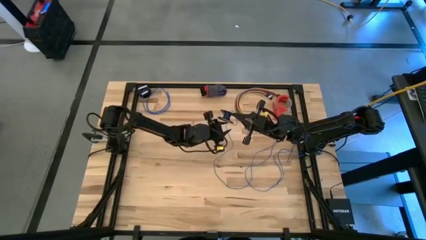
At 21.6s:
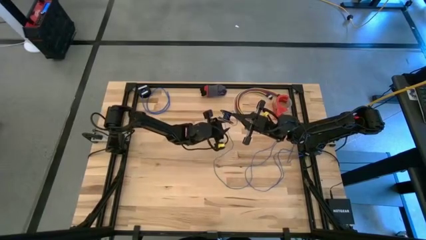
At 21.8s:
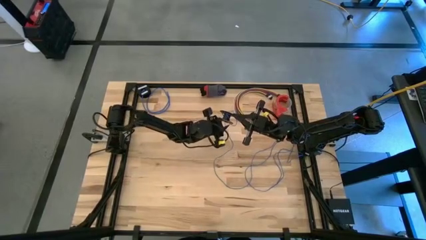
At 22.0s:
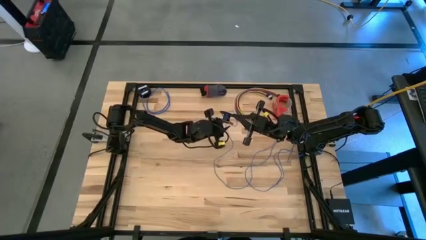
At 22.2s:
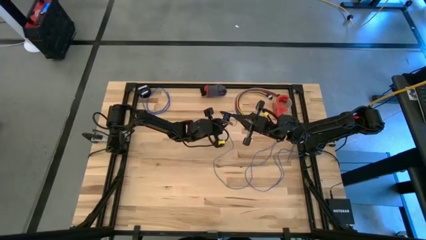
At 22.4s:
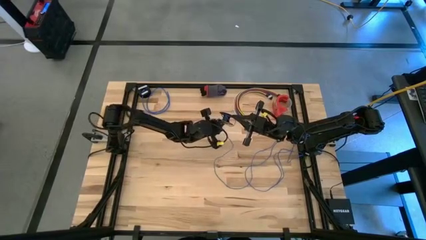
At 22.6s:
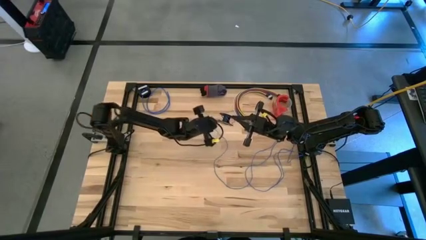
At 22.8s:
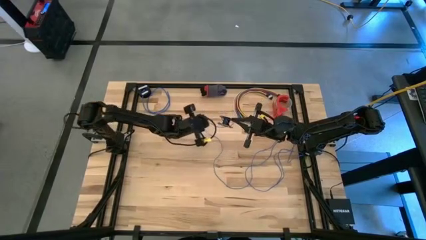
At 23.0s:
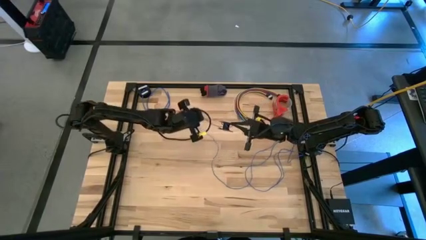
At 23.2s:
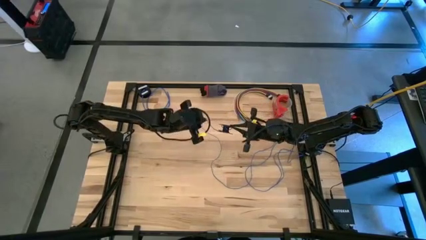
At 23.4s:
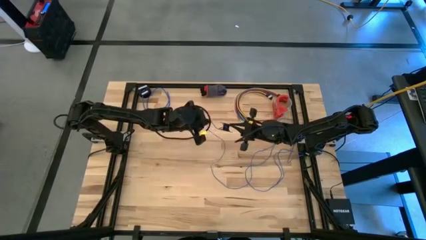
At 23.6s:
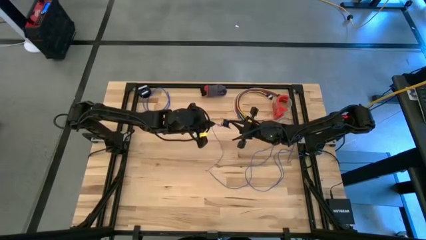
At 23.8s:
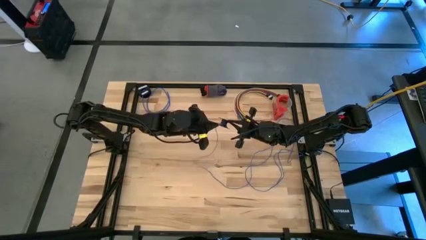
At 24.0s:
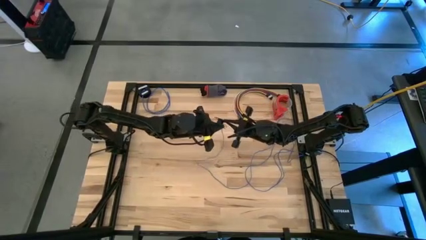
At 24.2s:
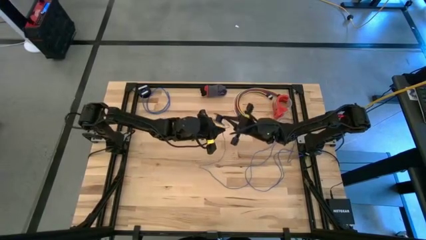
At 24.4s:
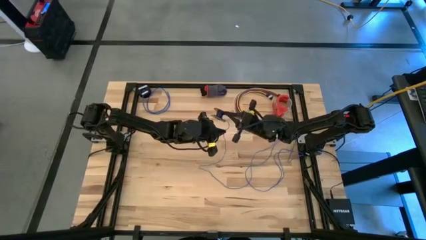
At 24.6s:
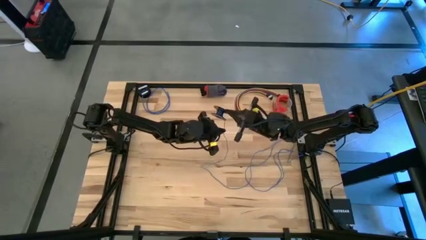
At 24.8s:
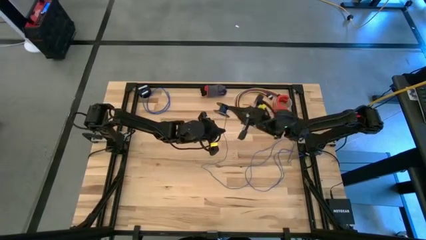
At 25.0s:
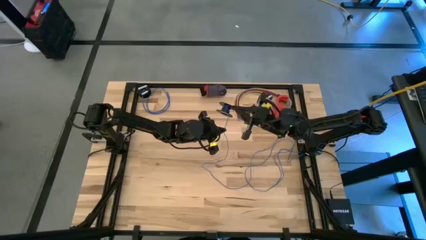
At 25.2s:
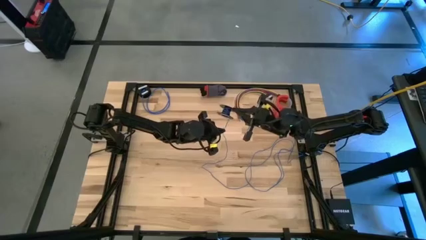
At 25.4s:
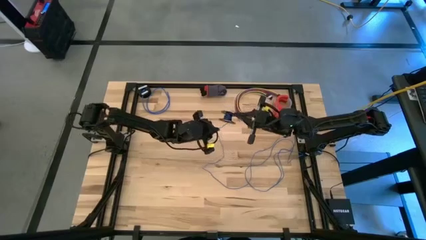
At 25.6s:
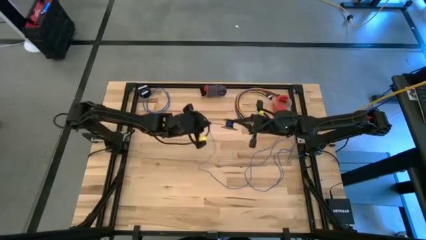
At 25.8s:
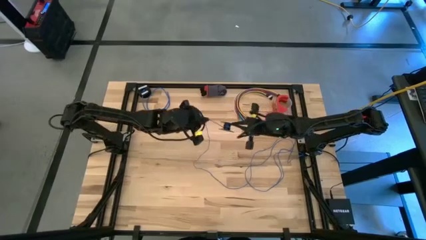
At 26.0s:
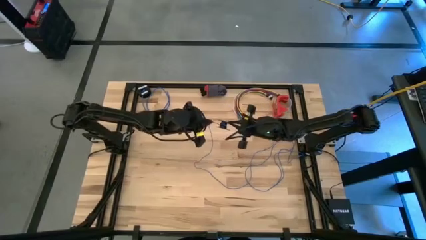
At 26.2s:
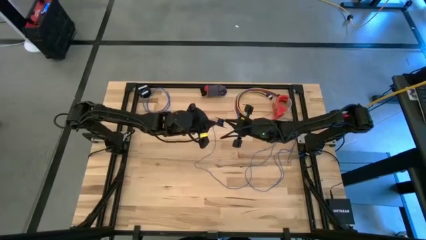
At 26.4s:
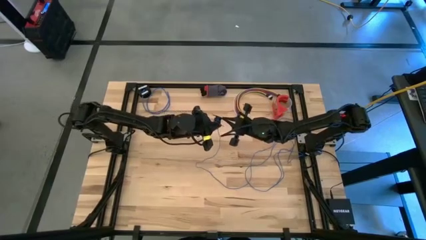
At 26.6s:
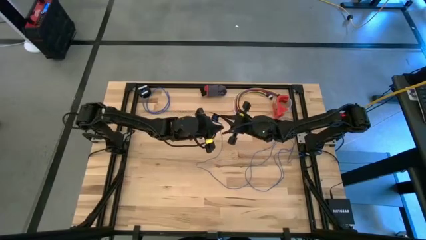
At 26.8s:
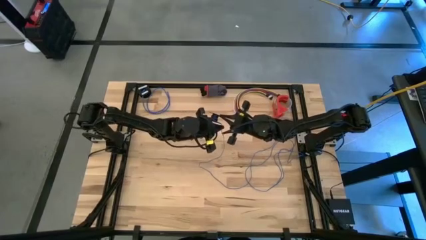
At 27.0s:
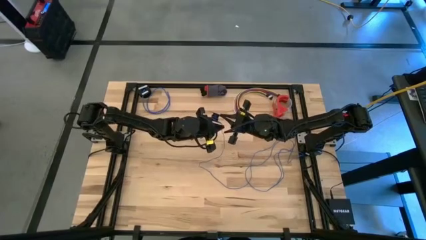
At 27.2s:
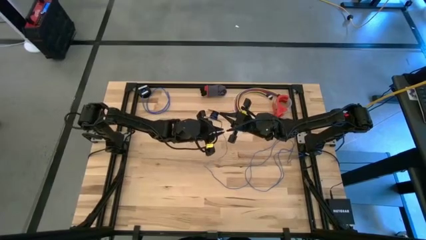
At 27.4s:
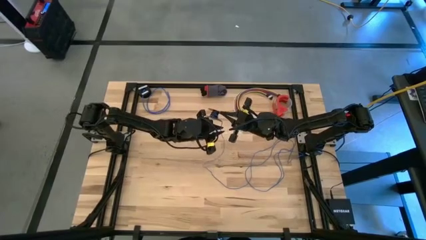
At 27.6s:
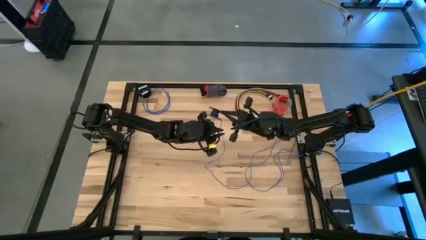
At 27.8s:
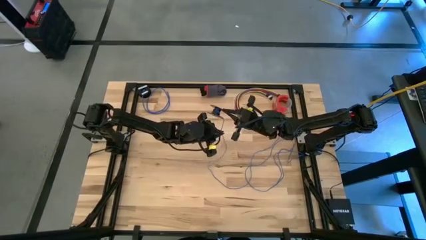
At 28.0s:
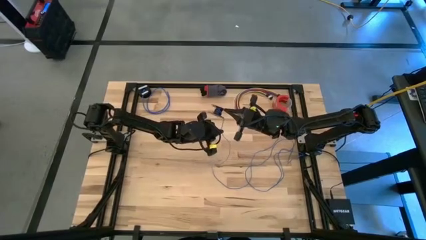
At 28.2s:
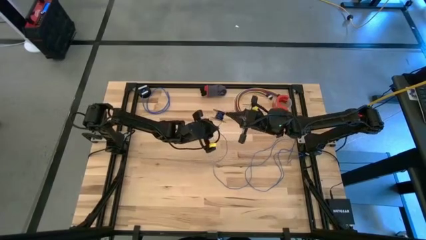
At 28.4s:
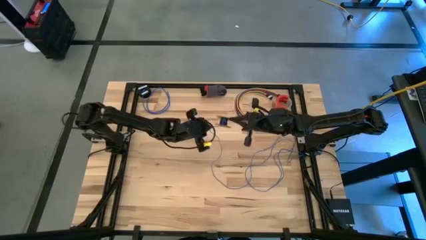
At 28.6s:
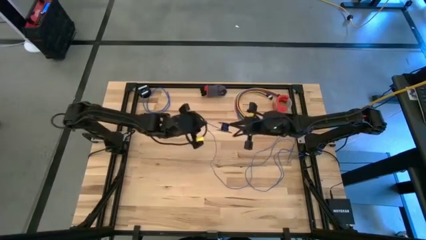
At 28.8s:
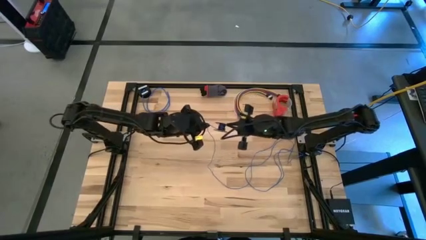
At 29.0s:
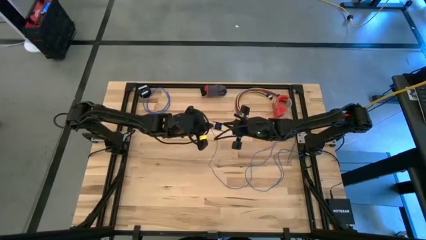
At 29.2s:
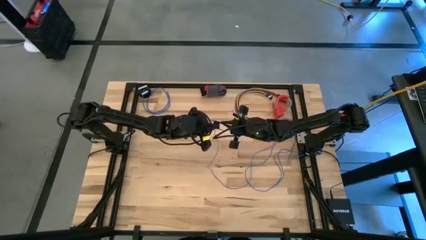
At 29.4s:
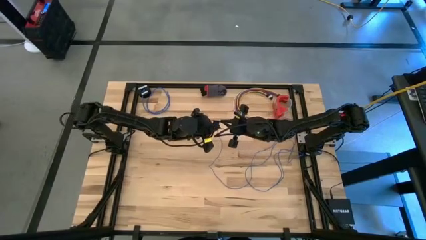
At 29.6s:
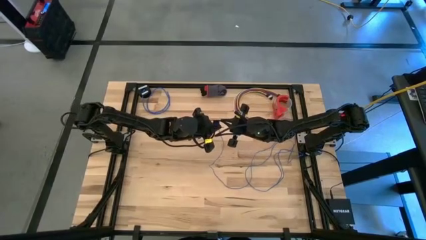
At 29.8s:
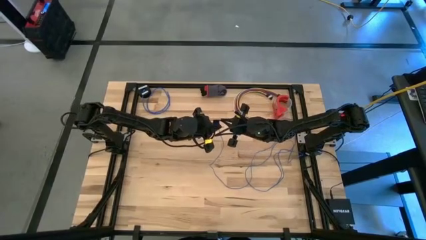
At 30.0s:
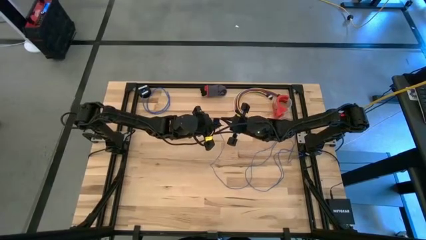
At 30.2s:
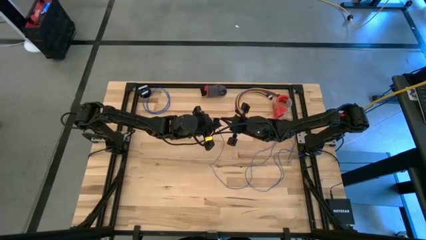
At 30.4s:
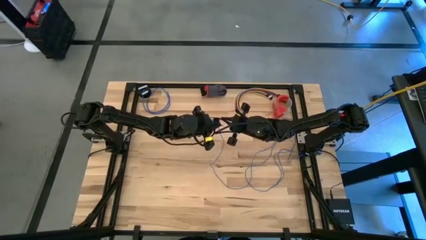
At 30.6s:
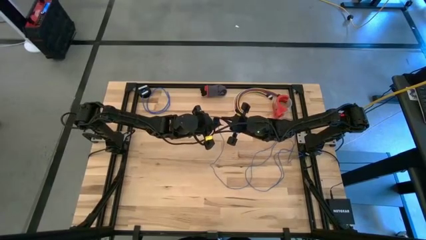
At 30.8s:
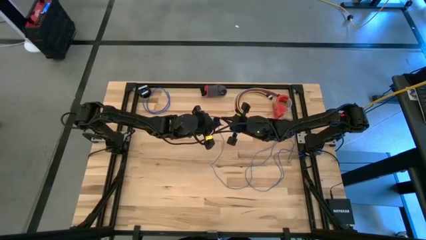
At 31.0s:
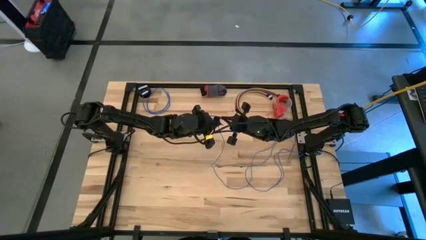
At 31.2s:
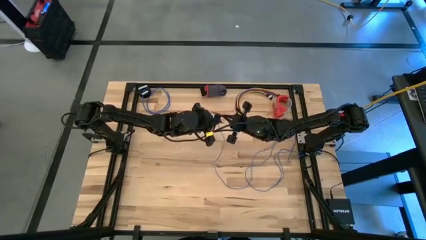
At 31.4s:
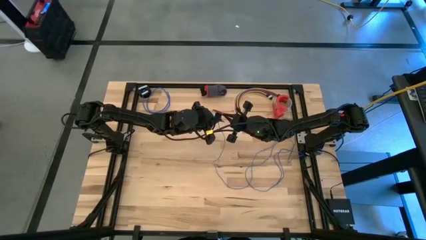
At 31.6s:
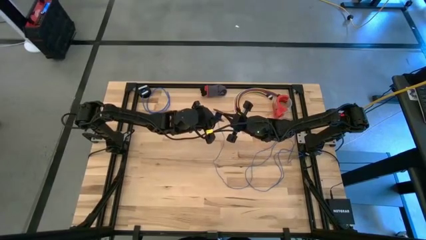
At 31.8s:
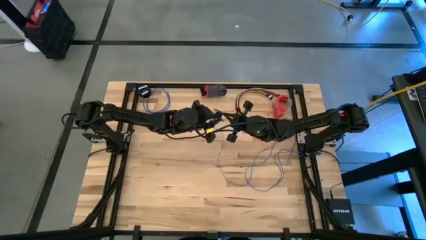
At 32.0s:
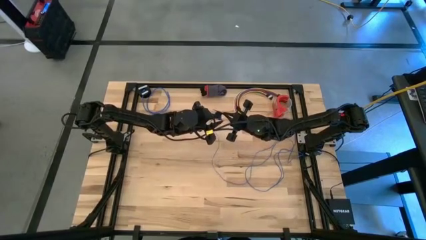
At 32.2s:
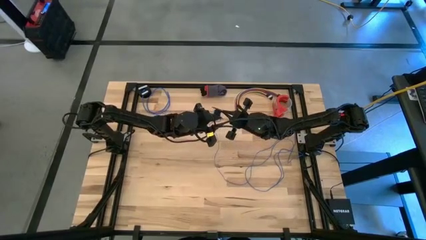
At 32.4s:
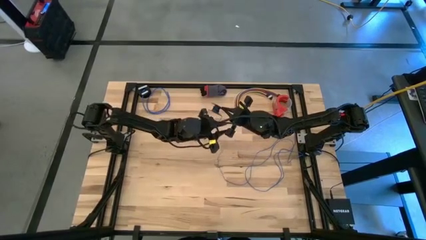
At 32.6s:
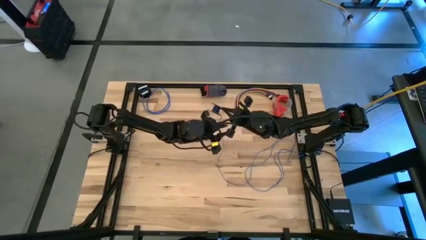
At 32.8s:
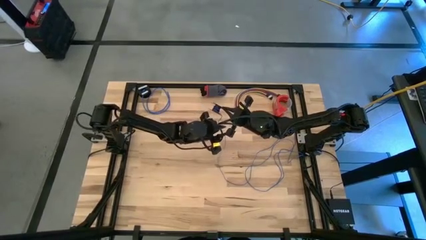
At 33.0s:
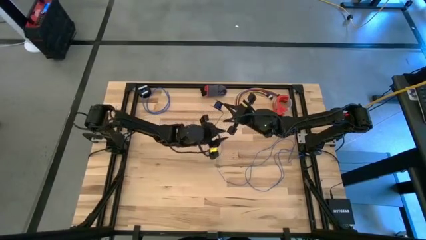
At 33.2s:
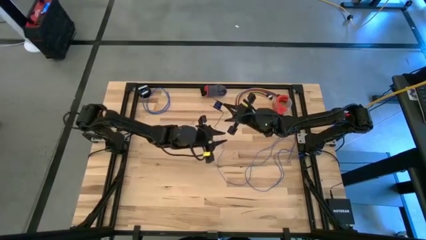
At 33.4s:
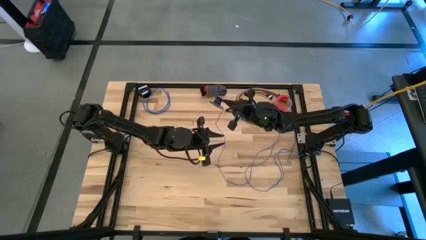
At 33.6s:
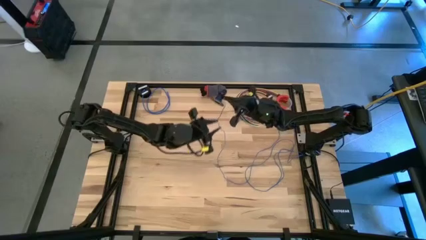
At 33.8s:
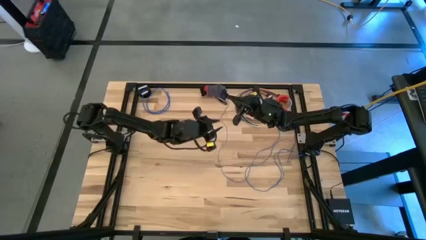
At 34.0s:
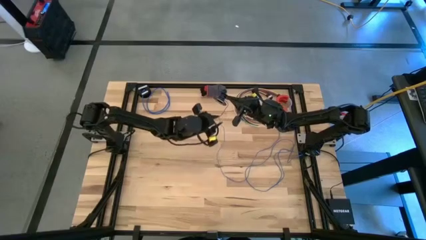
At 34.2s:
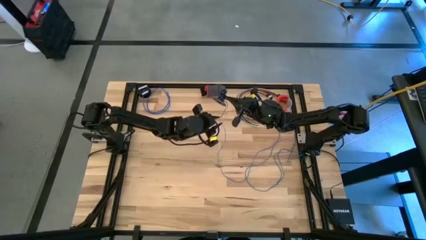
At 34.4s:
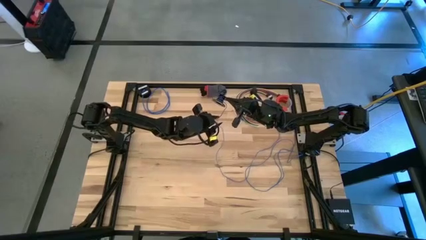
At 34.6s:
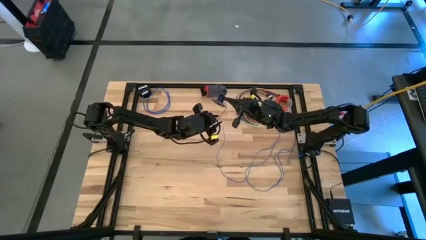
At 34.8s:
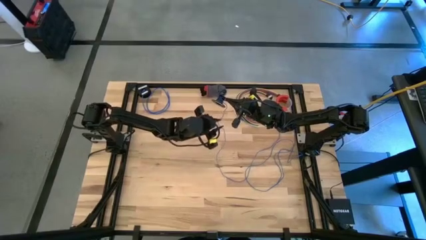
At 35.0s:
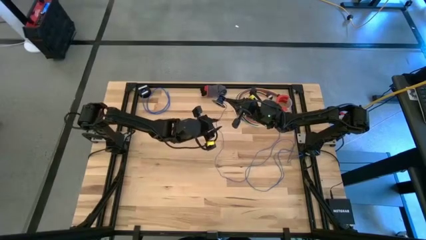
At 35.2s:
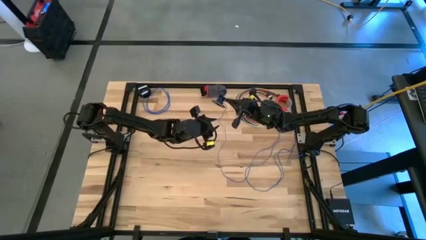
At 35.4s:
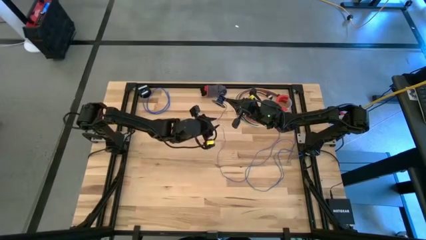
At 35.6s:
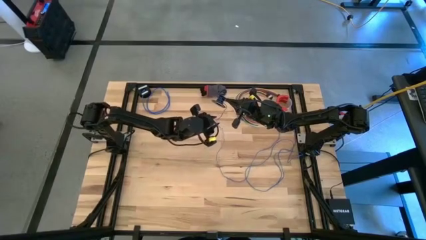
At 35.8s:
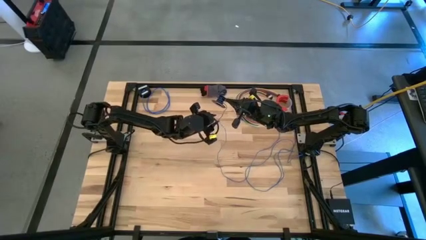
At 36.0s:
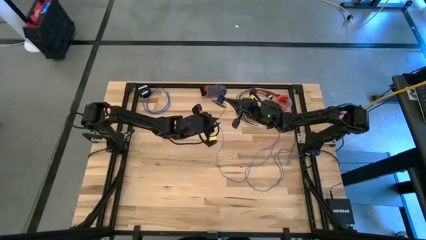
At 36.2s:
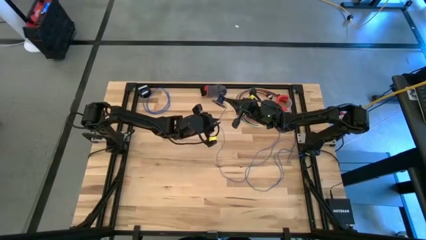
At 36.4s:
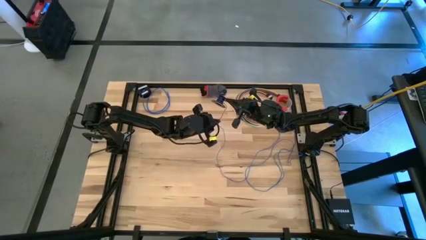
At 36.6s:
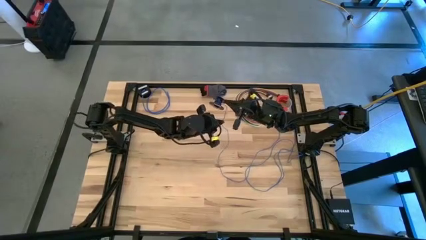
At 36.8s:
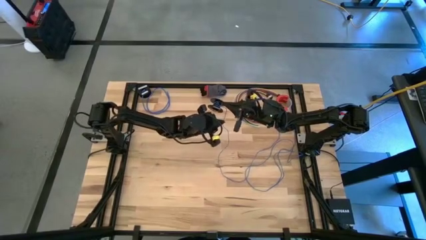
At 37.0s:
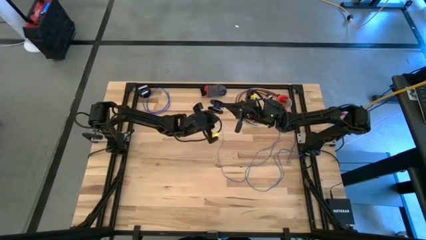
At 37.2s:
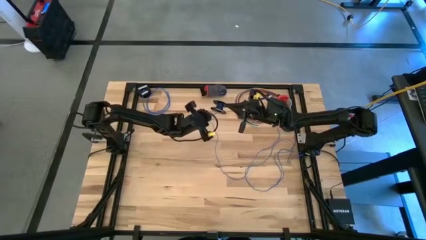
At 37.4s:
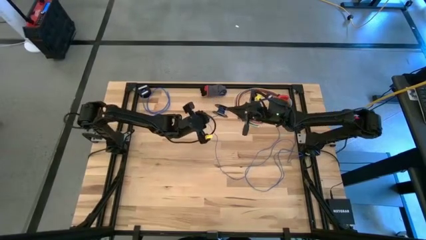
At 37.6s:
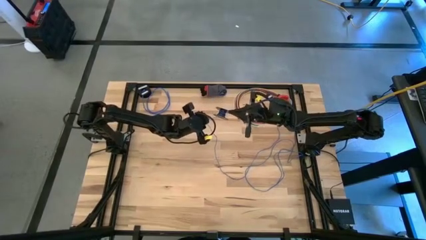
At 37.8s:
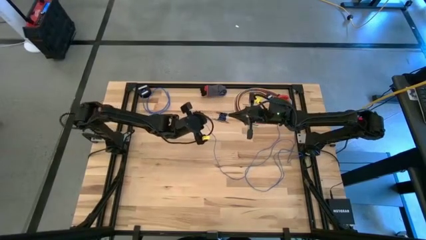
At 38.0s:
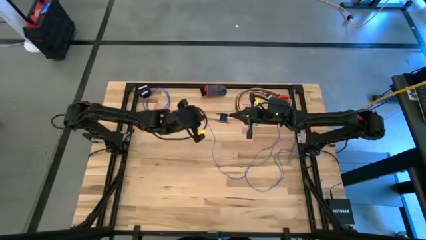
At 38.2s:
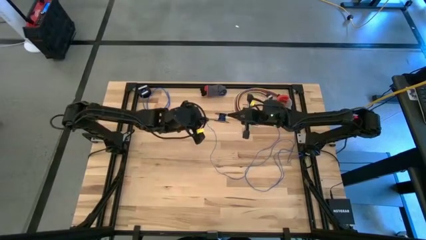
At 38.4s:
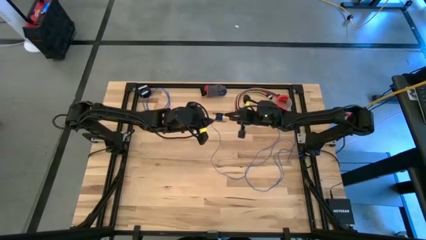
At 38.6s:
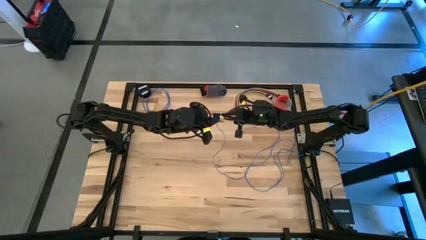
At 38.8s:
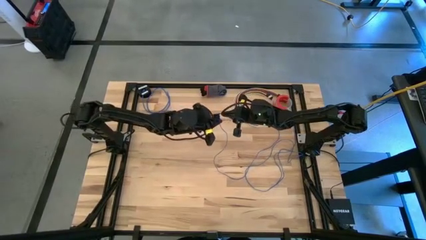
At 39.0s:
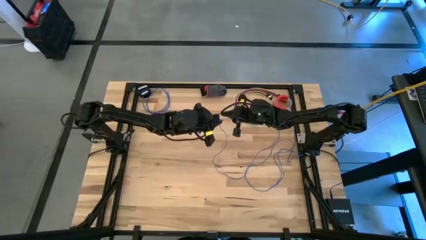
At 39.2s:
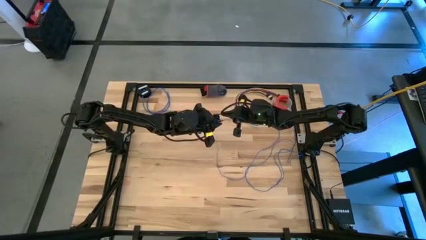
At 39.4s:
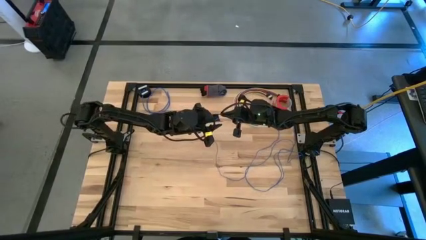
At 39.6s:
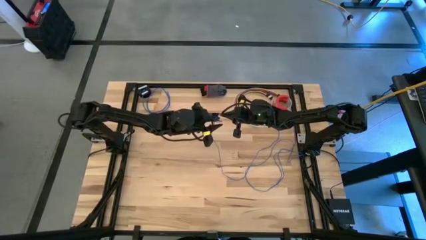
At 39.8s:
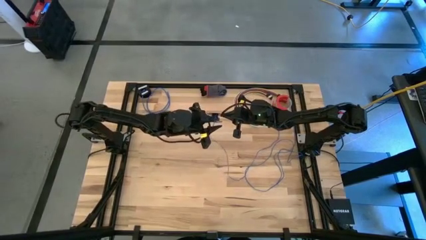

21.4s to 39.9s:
Task: Coil cords
Coil the blue wire on the black spool
